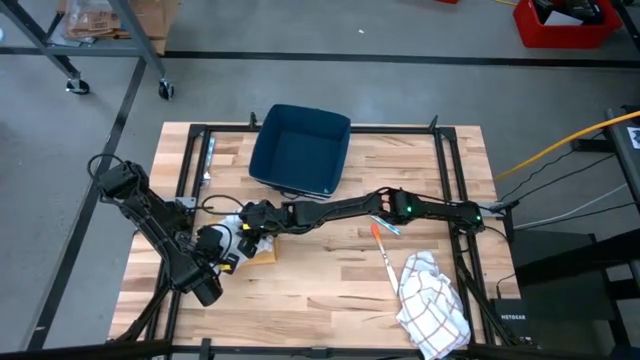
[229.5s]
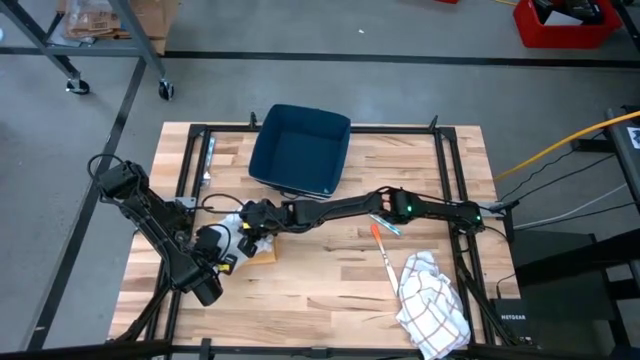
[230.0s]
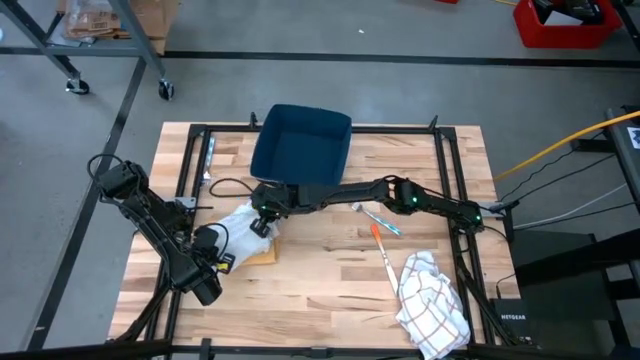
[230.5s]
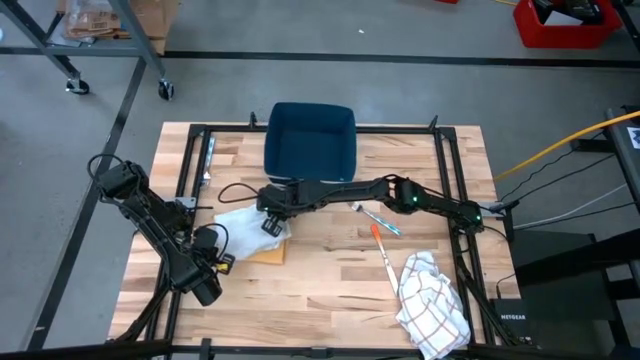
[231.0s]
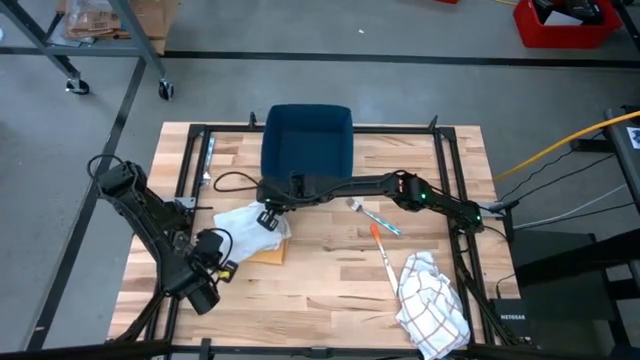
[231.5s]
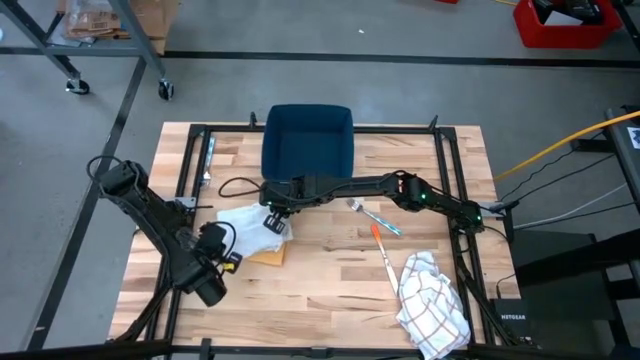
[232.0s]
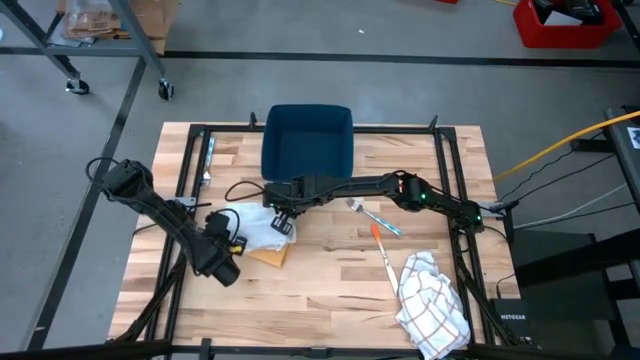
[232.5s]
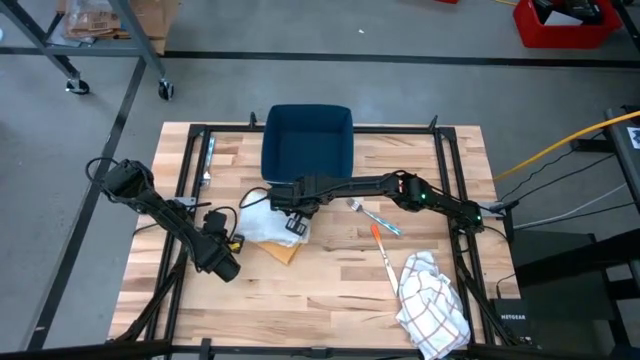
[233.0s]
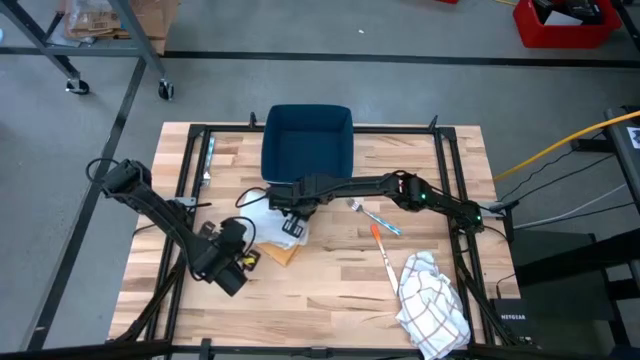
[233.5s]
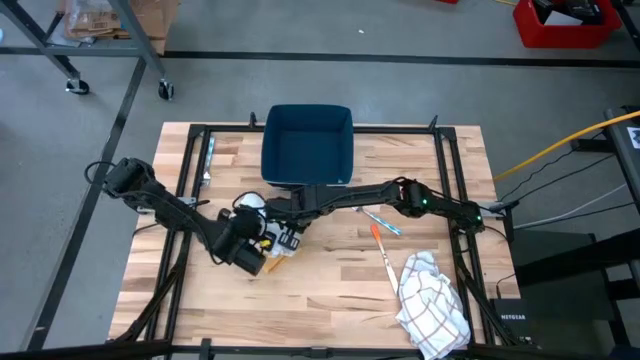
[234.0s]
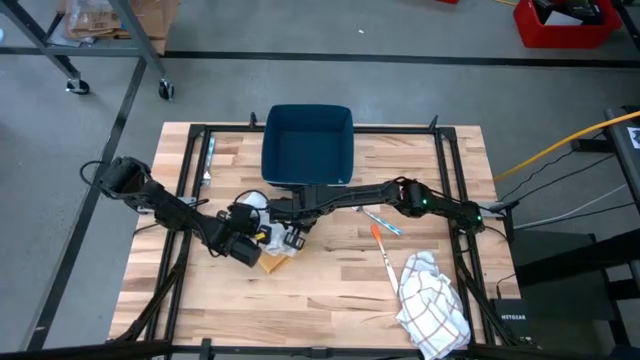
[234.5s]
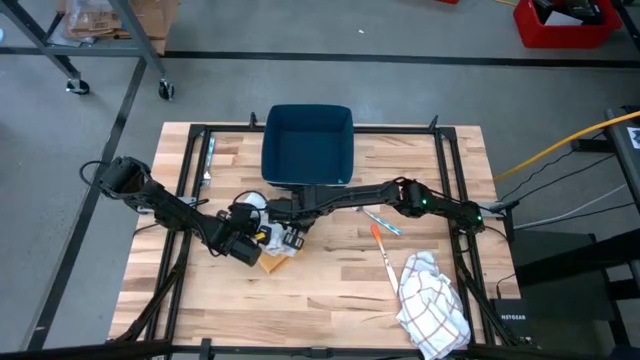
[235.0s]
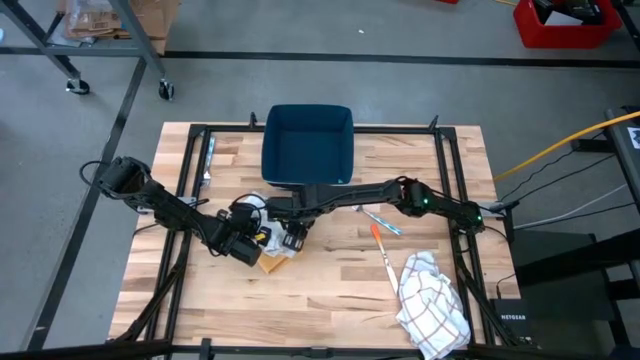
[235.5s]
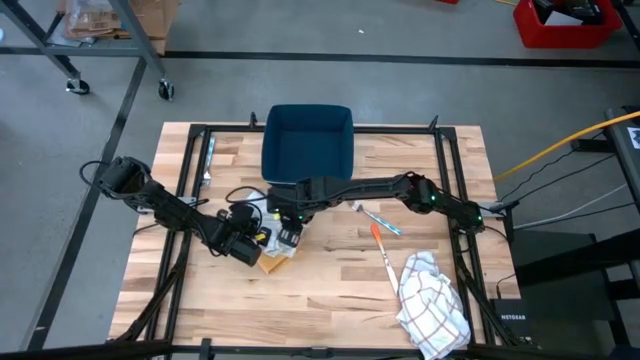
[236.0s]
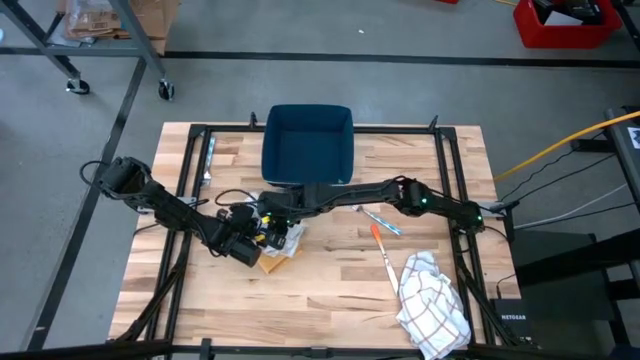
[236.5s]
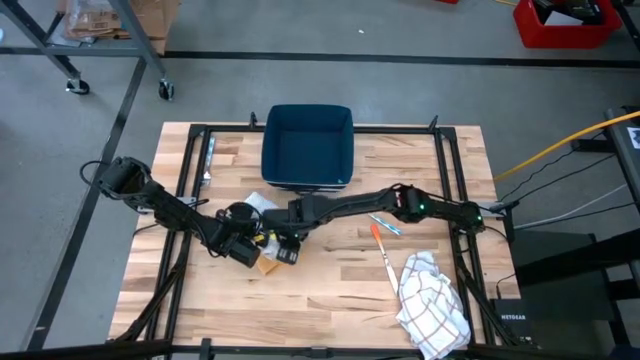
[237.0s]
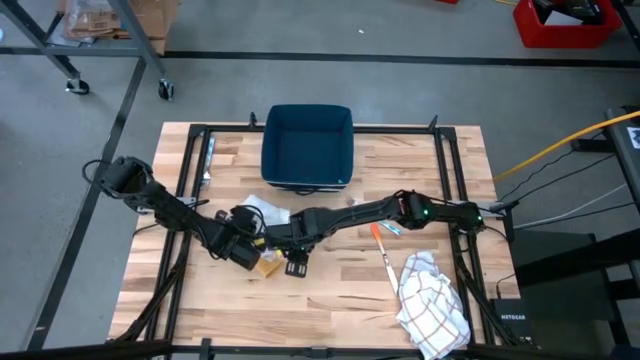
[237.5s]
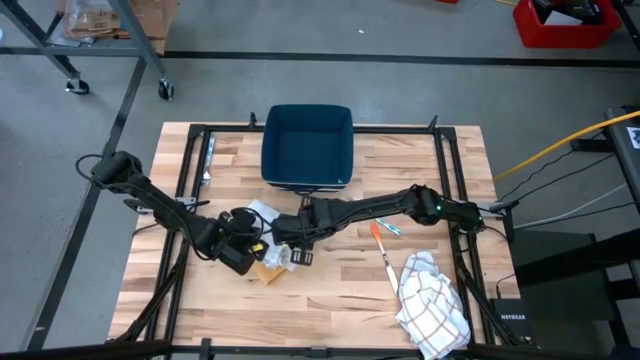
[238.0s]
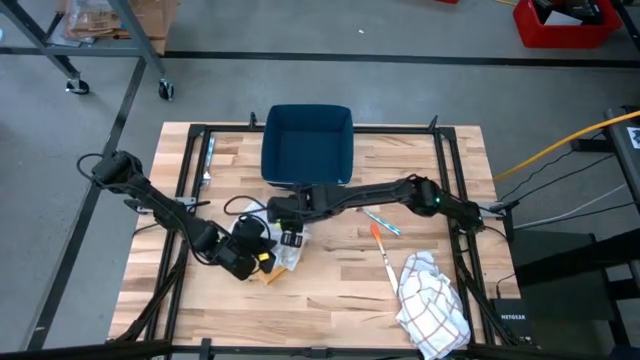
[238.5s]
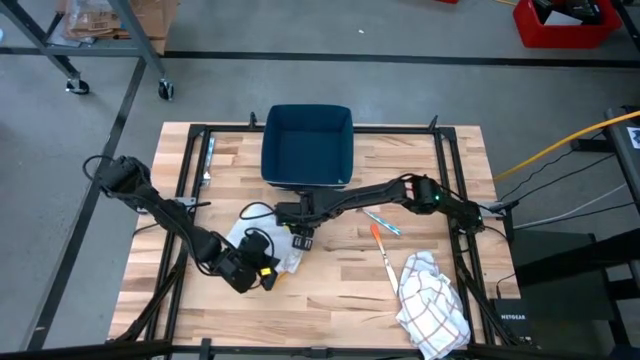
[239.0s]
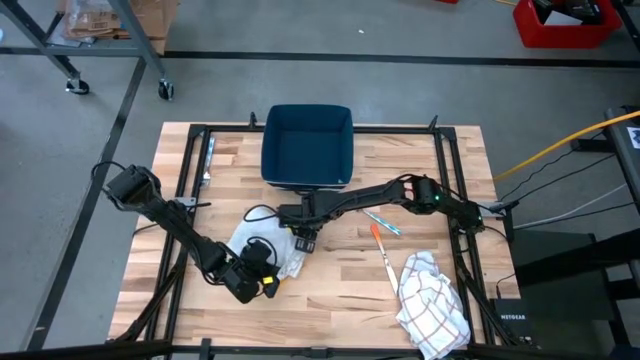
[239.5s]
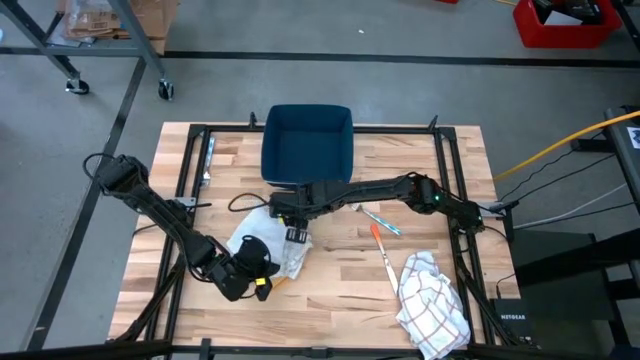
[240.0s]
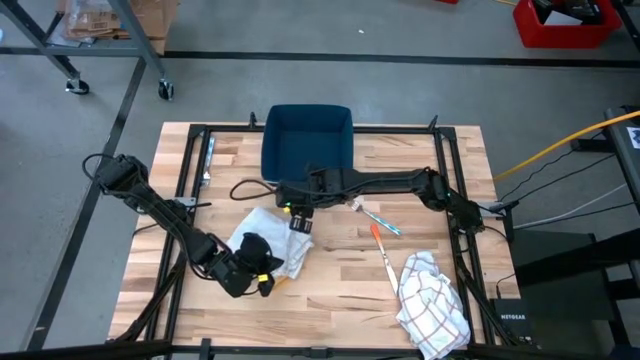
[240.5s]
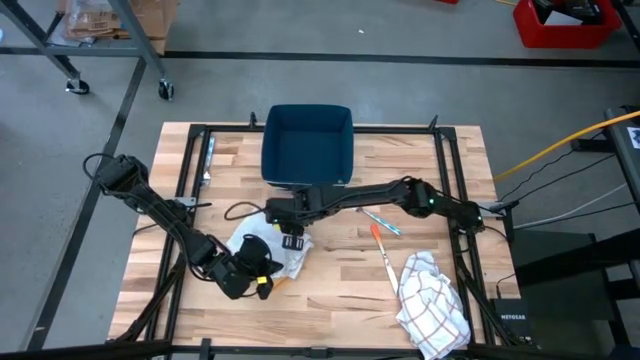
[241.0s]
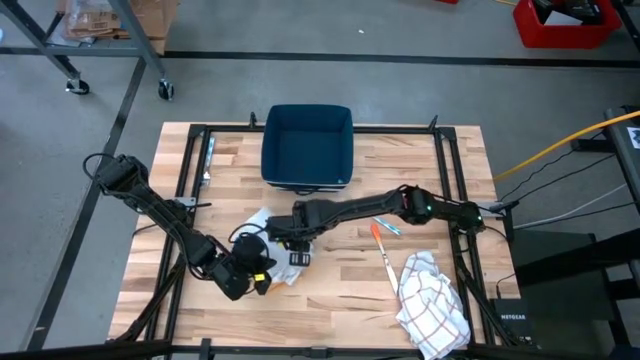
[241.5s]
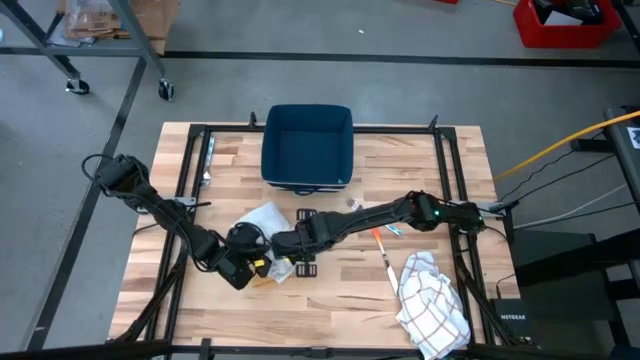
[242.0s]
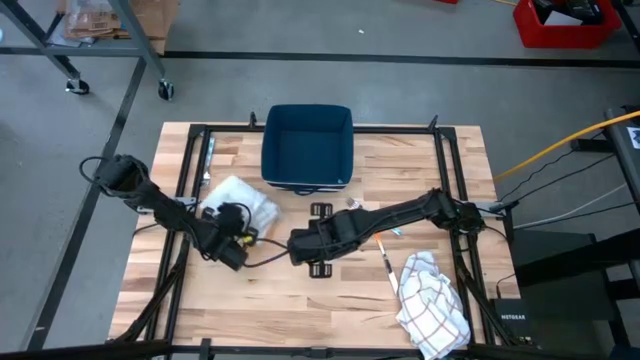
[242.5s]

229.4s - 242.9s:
Task: Fold towel
Stack the folded top white patterned towel on top of the yellow towel

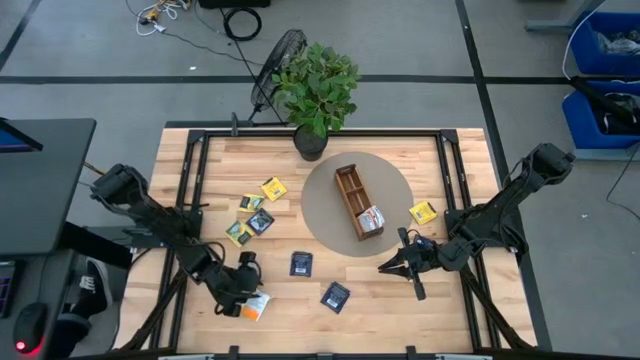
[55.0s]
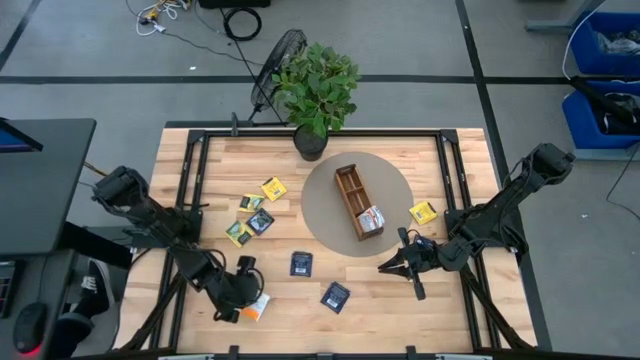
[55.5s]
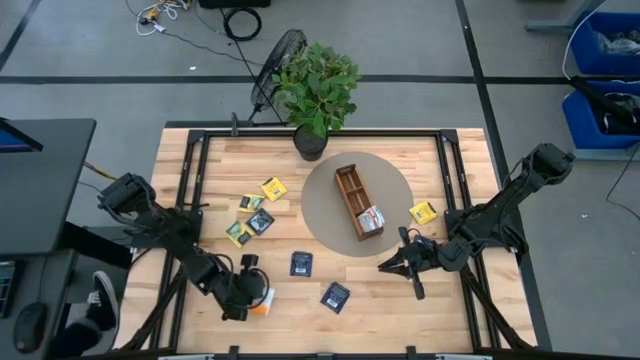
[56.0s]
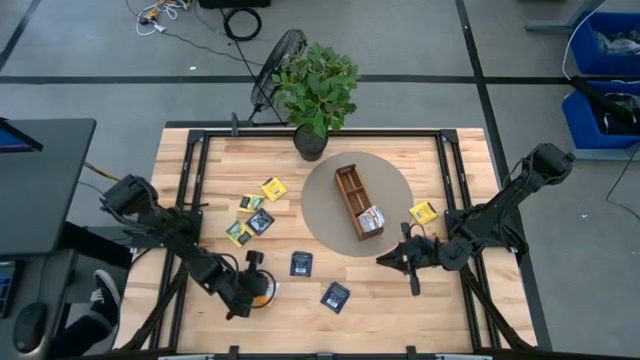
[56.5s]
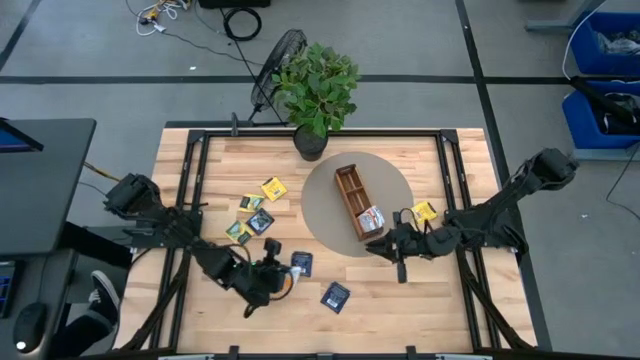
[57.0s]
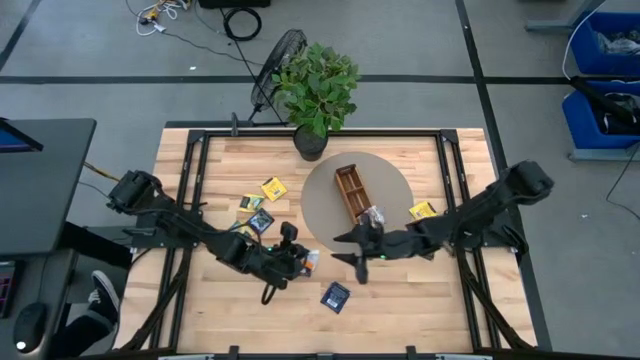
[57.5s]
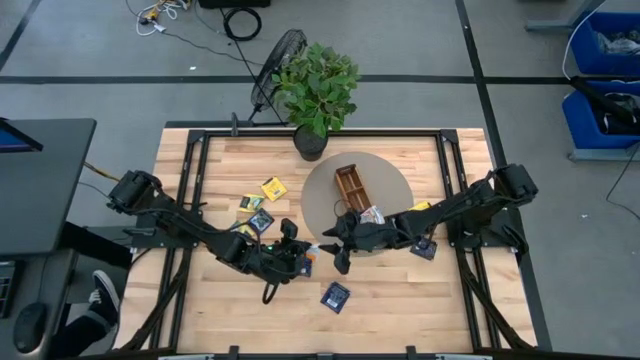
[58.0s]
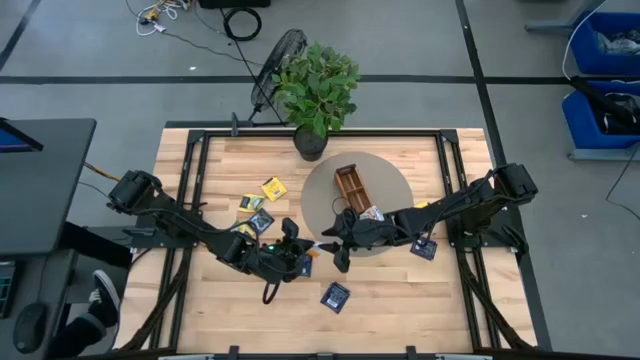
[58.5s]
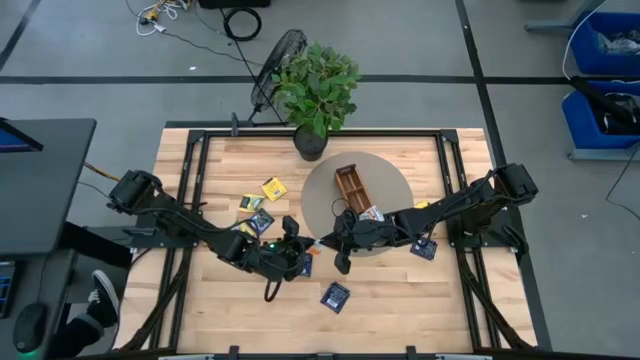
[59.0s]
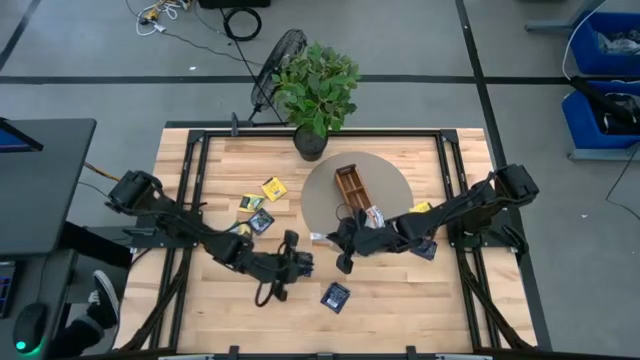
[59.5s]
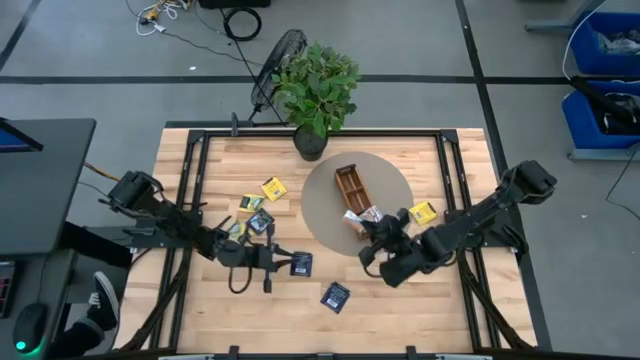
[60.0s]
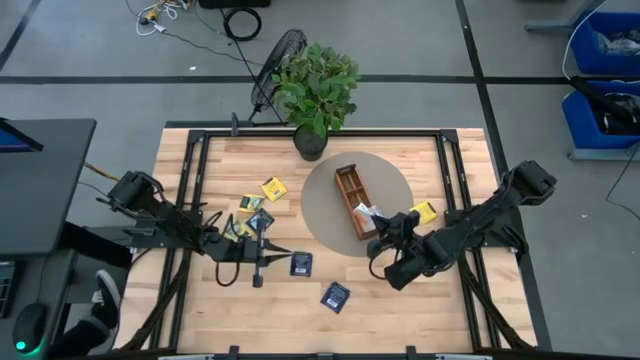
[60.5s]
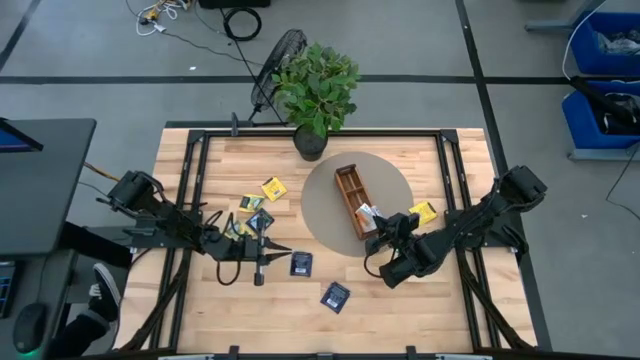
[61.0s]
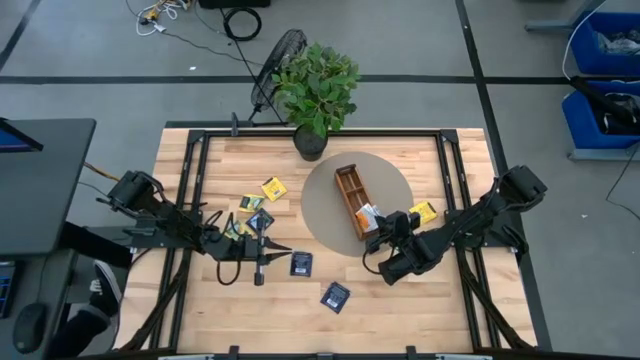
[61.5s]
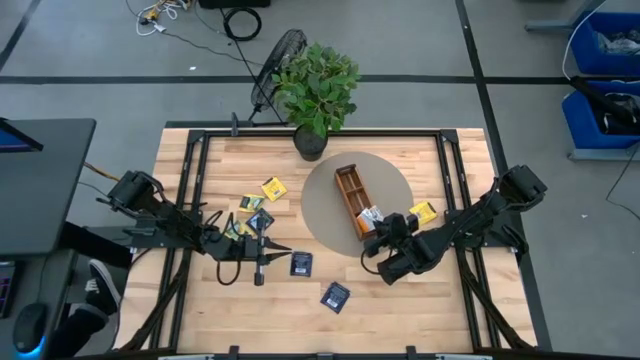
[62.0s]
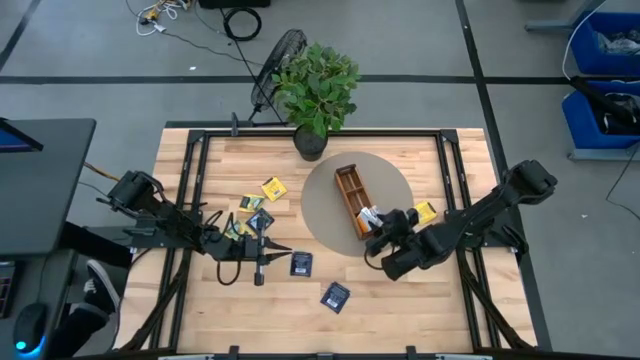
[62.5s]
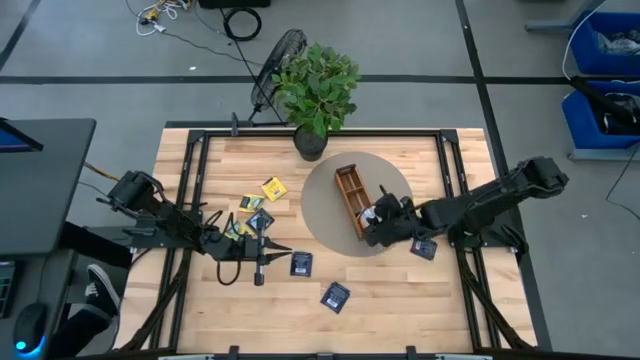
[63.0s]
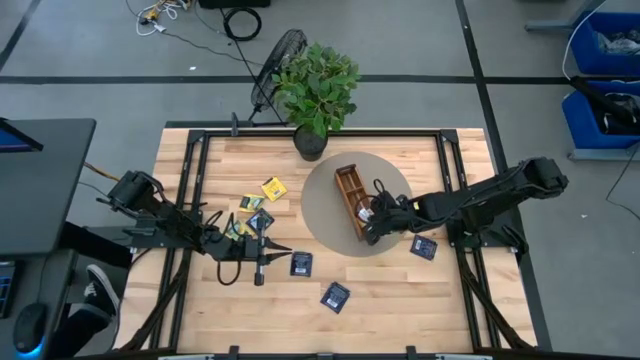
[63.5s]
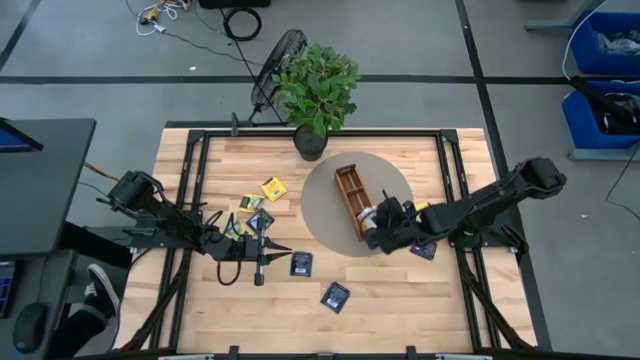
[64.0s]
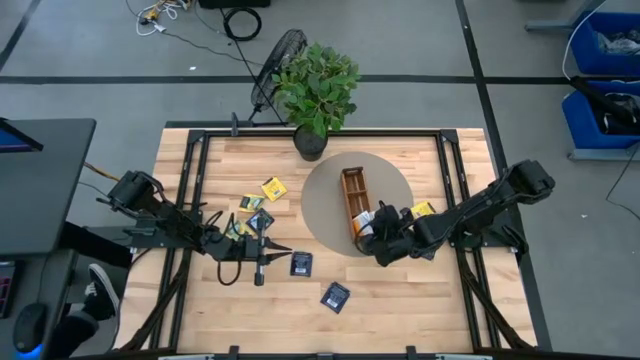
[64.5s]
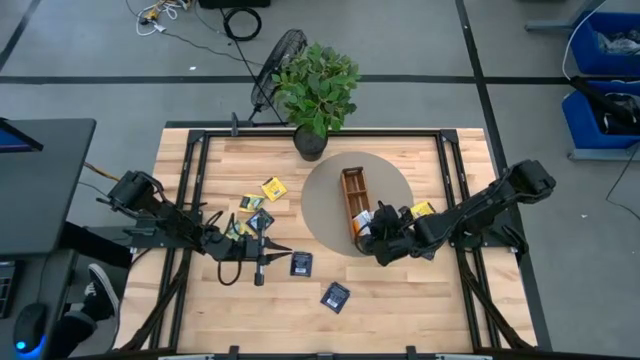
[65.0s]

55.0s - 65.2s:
Task: Pick & Place Tea
Put the white tea bag into the bottom section of the wooden organizer
